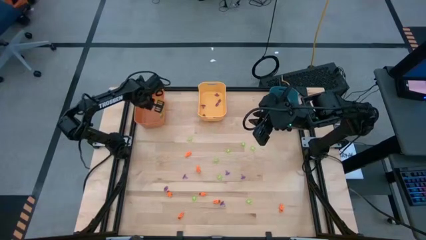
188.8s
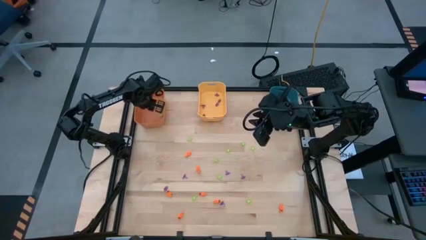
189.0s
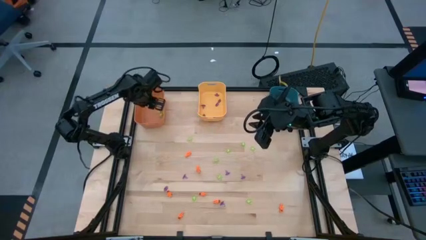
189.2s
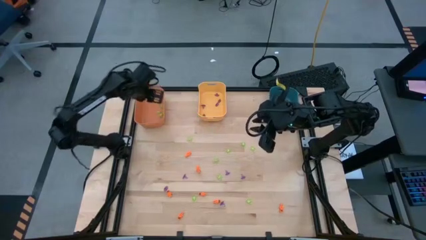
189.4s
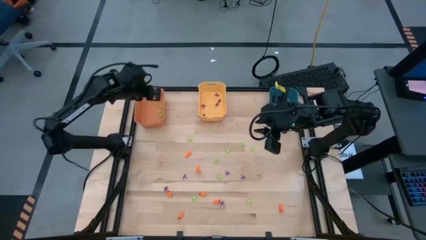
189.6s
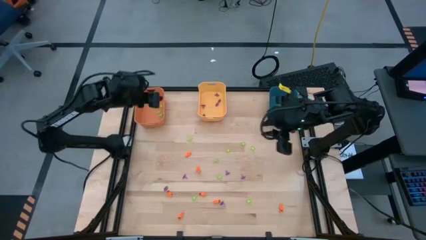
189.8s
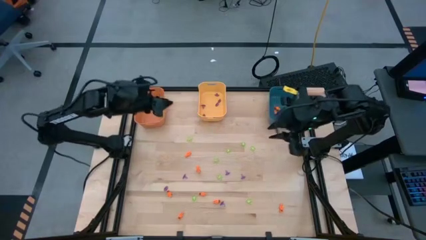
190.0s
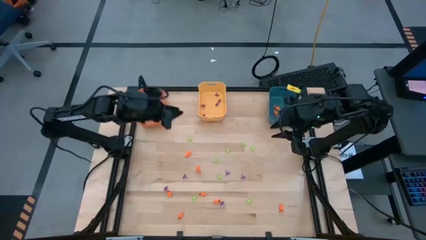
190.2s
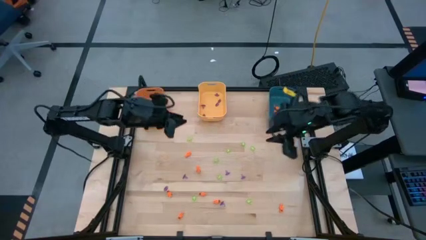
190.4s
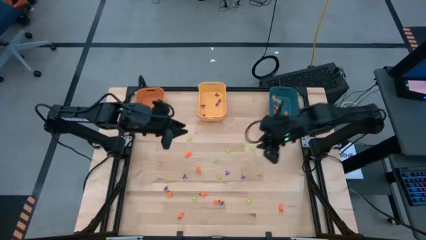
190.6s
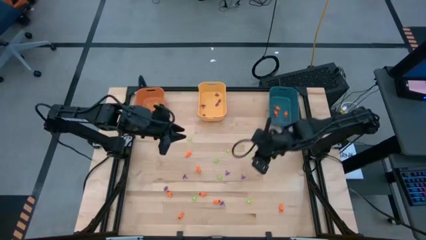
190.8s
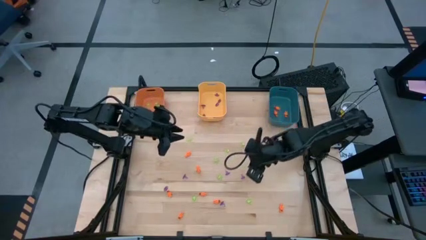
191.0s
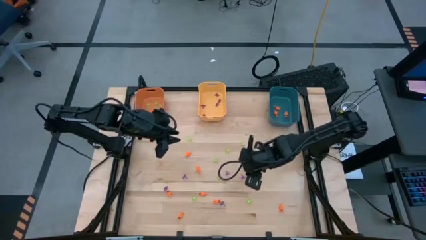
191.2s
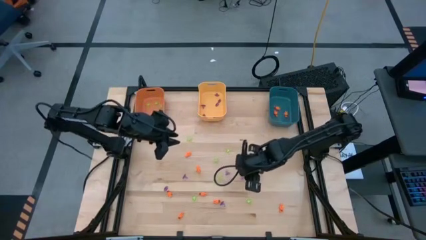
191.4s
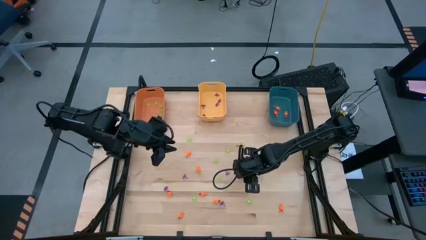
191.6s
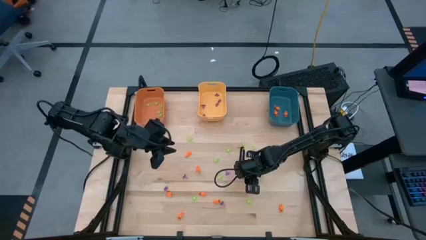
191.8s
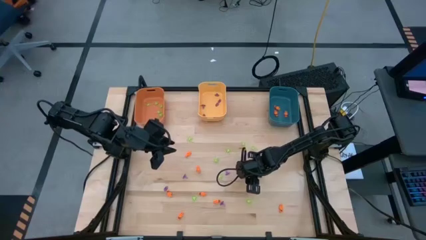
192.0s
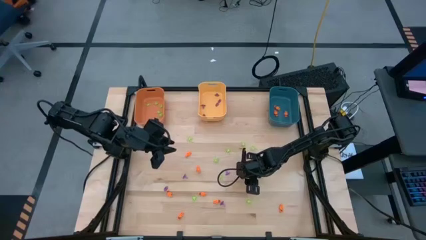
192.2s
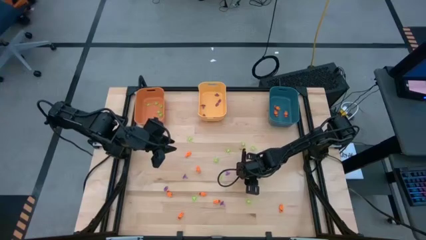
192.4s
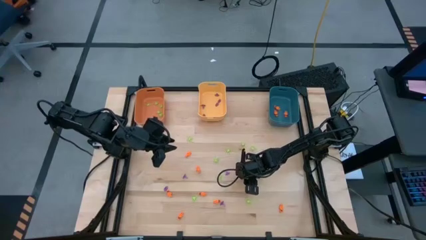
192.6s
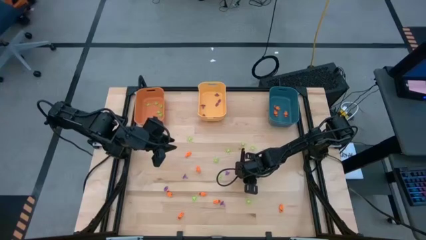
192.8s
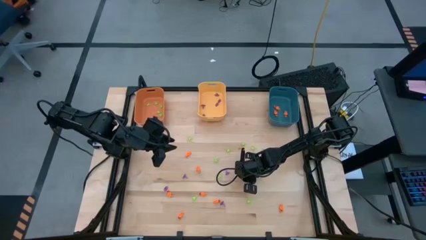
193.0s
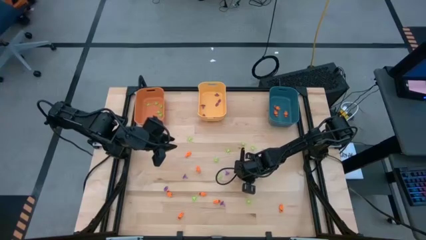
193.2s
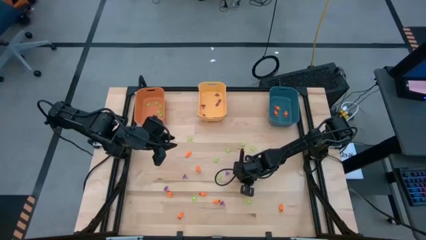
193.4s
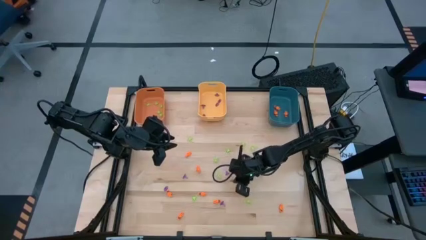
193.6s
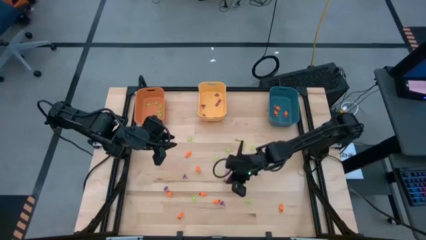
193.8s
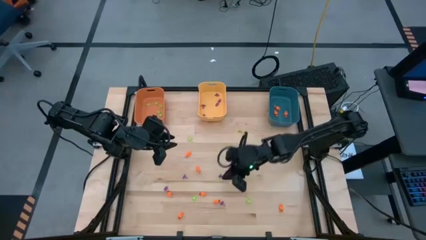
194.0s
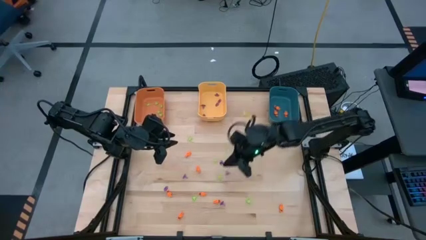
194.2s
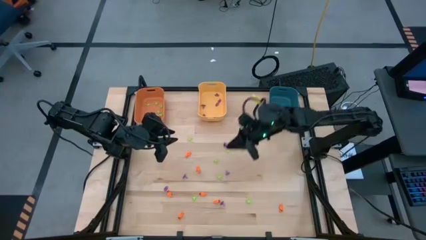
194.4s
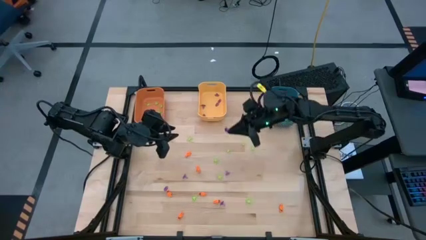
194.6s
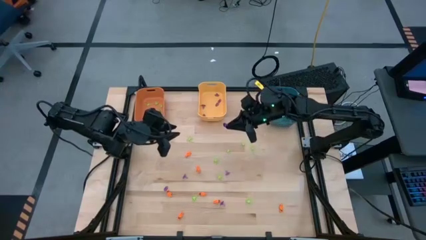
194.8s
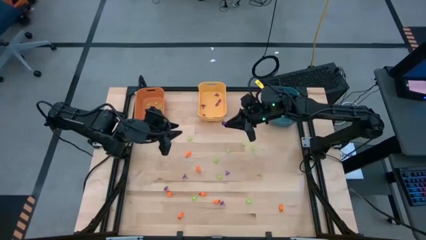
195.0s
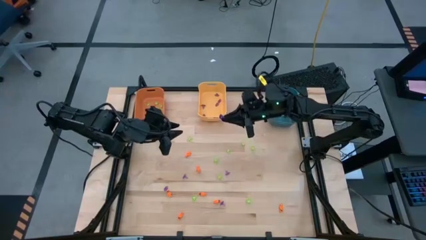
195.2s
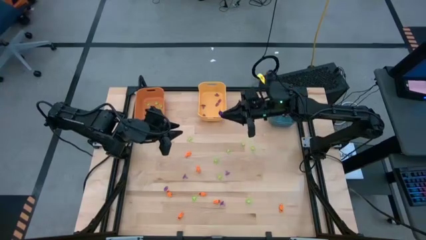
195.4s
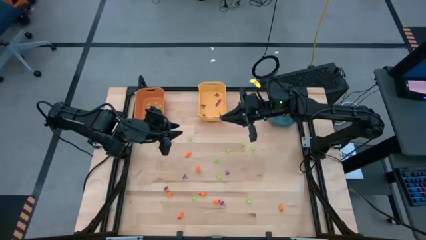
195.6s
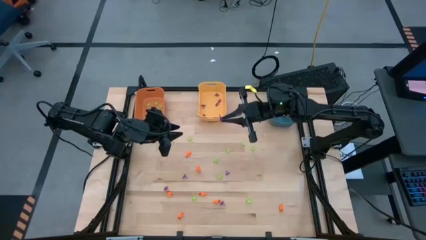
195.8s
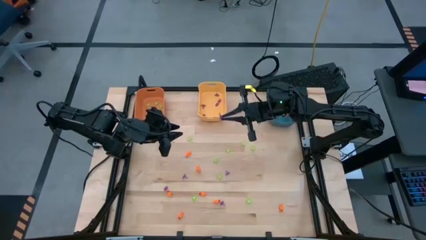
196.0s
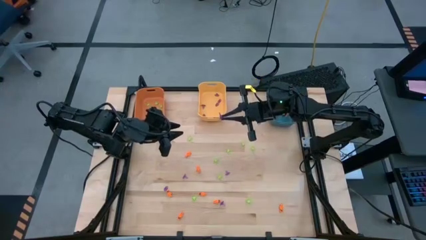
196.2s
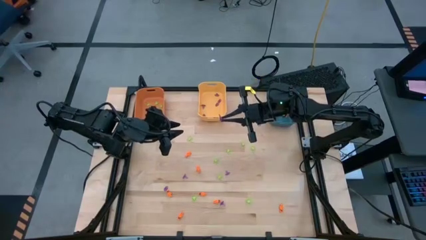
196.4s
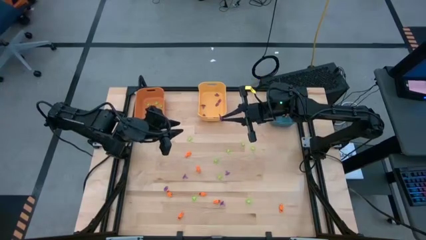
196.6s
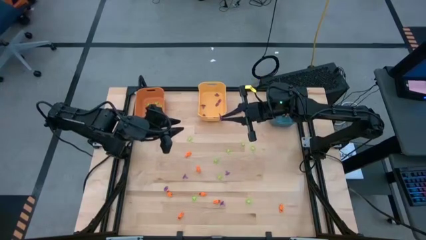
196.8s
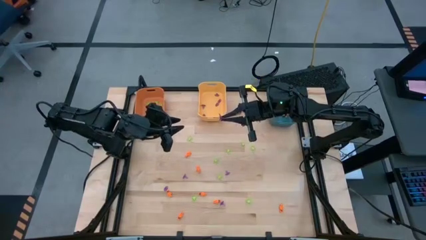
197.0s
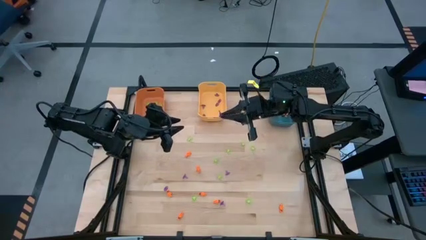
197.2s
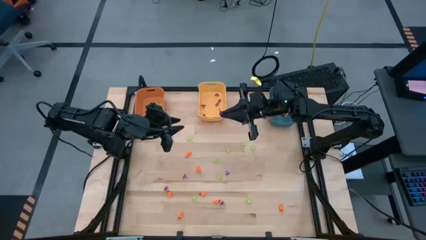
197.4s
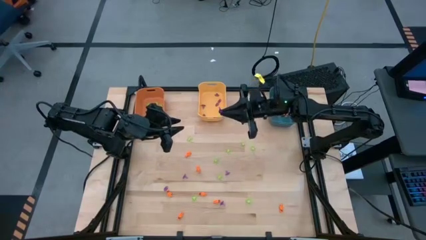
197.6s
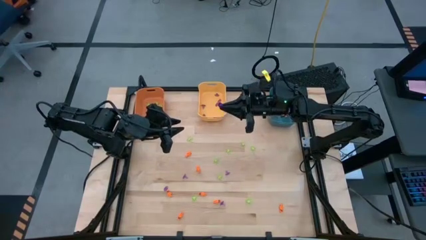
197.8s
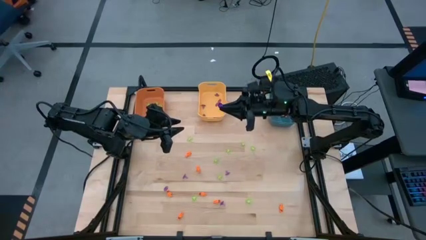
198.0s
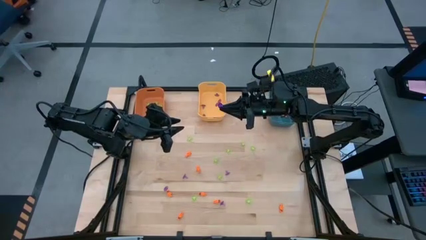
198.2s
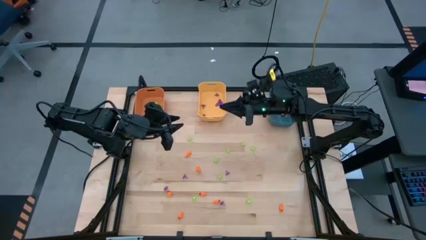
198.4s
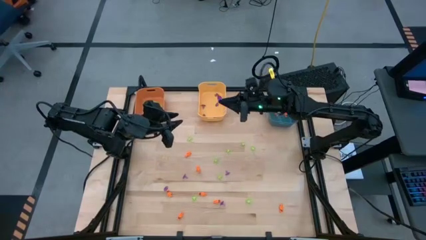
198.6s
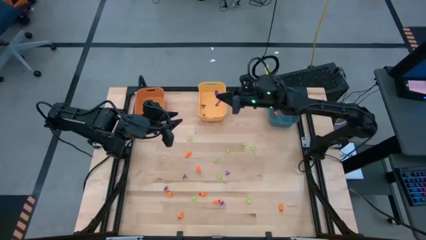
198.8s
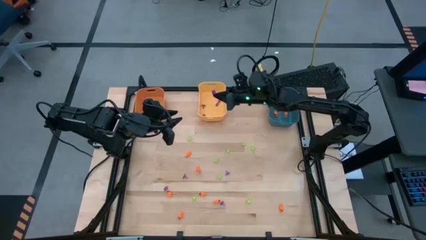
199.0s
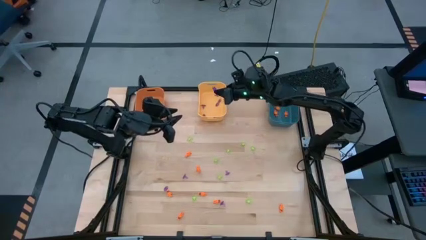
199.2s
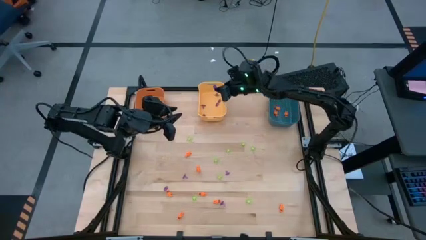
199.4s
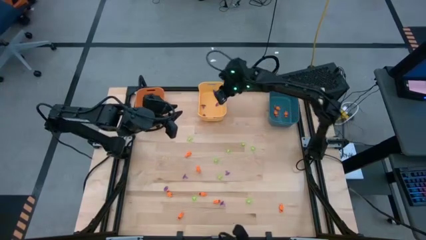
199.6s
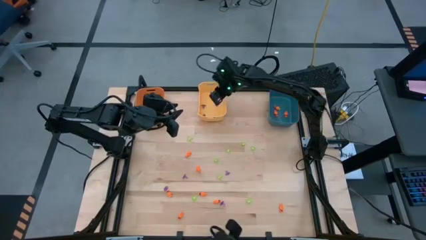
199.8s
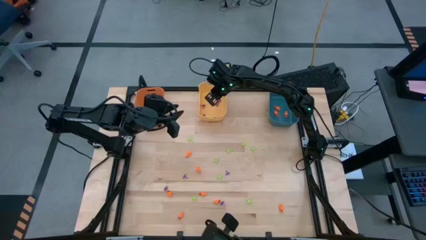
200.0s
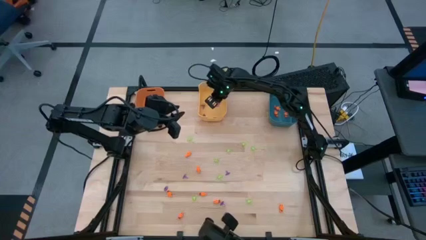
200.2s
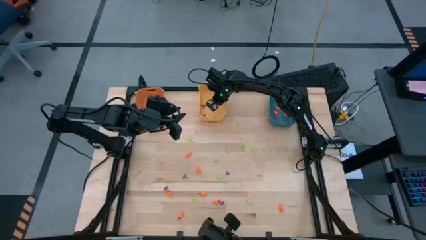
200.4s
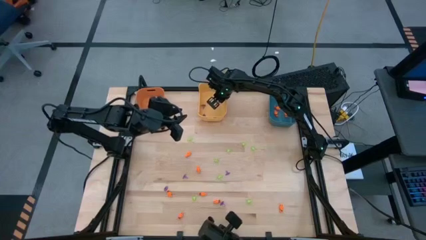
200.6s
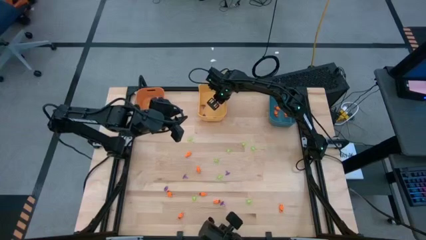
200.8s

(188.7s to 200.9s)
Task: Sort Halloween decoration
Put the purple witch hat toy into the yellow bin

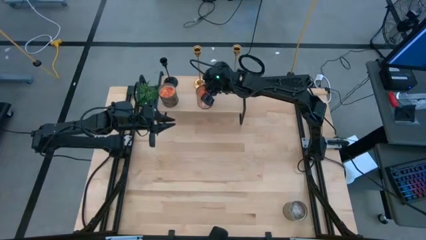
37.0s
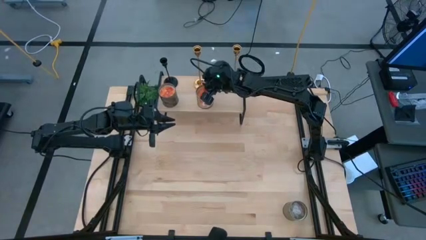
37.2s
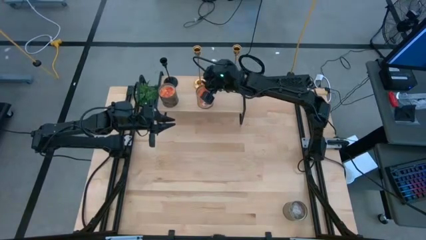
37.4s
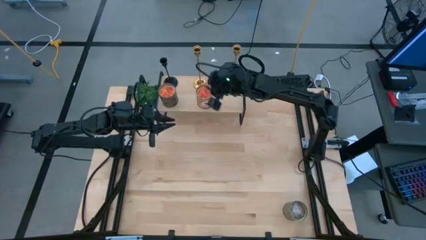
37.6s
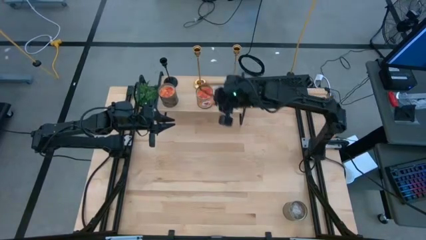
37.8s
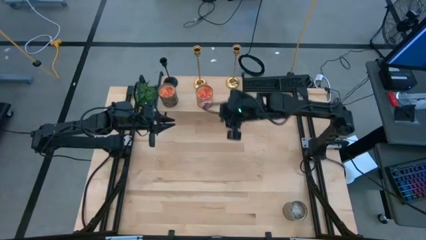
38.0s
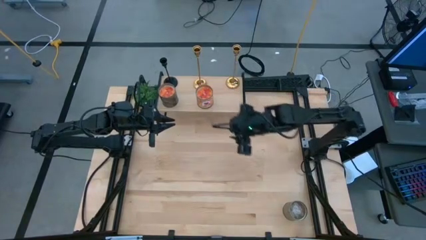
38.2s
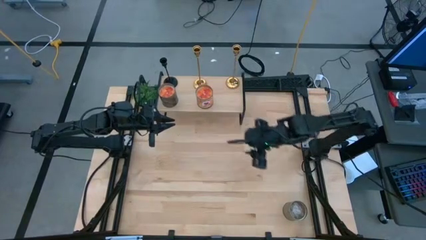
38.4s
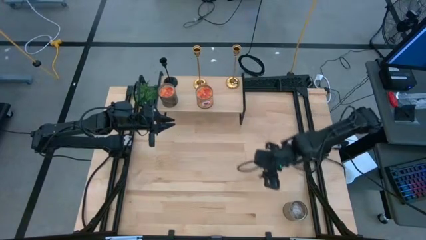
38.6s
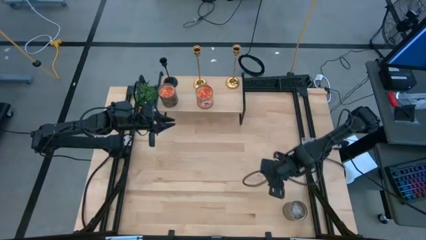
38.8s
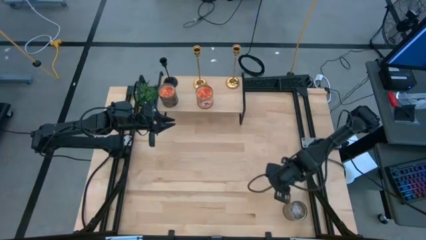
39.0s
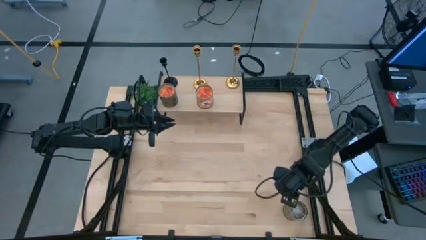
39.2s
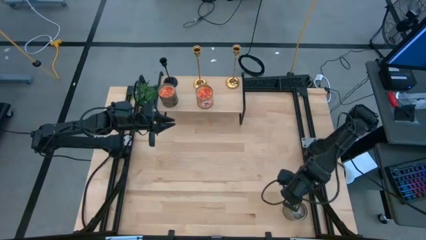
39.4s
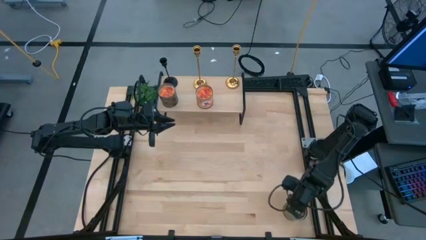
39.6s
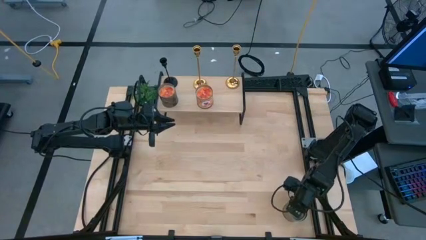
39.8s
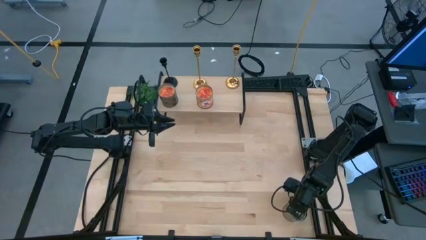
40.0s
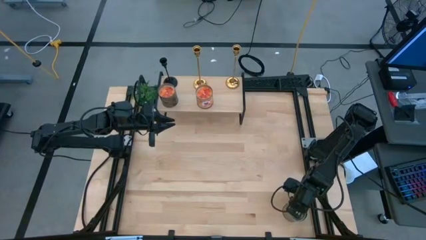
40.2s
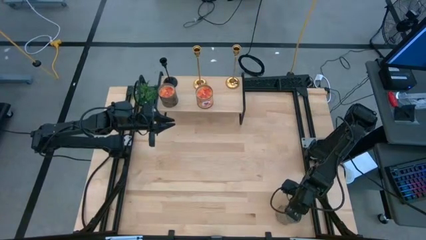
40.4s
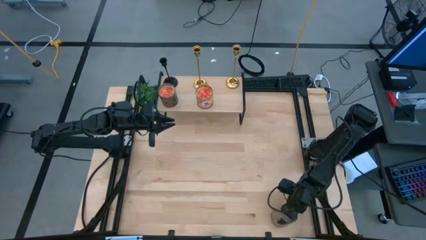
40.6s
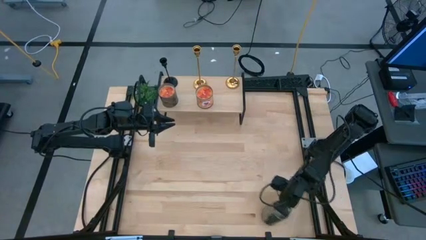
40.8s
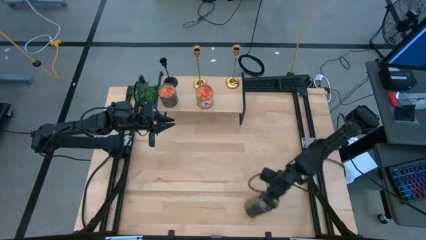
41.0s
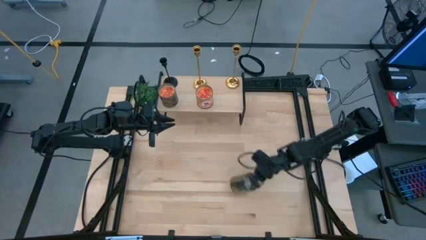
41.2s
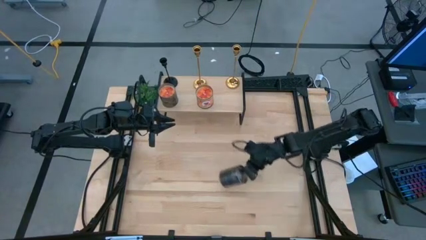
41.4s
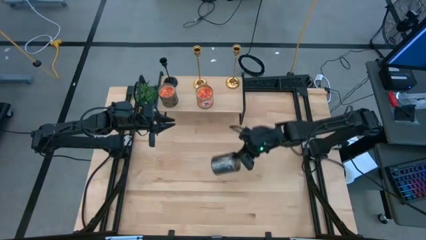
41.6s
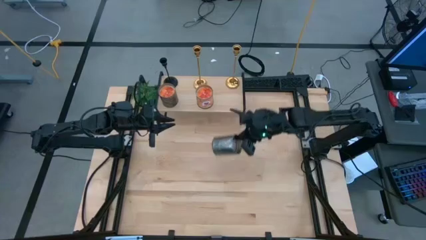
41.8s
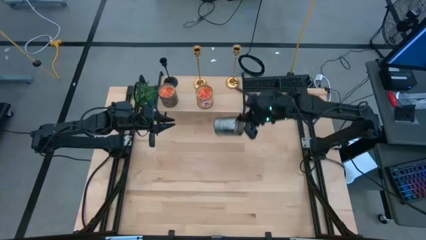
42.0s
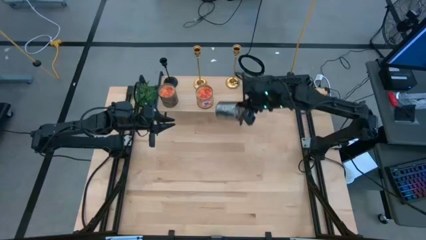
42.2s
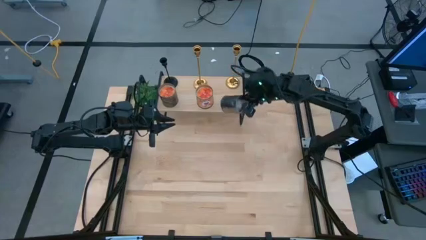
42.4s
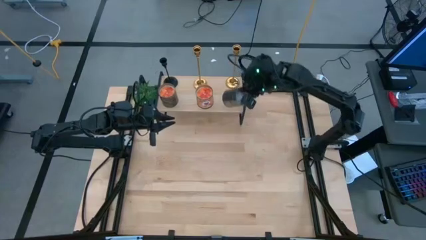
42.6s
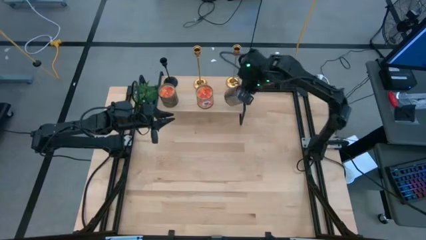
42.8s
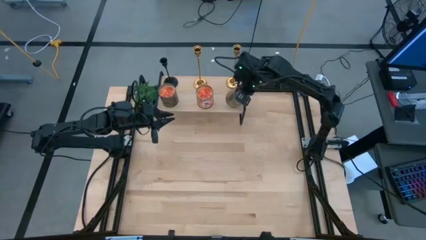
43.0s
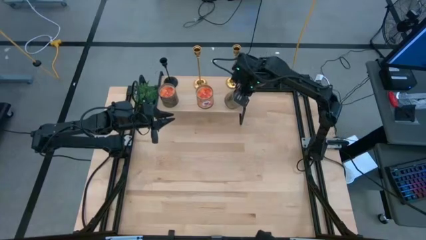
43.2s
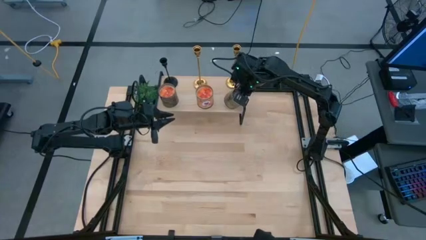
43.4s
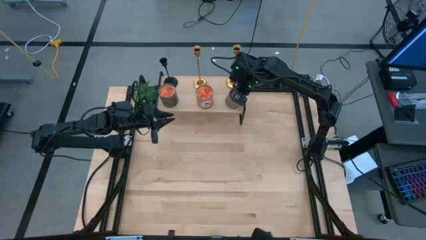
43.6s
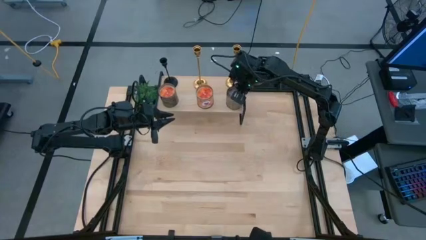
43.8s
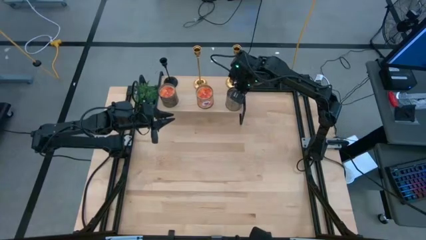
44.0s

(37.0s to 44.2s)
Task: Pick & Place candle stick holders
Put the scented candle on the shelf
